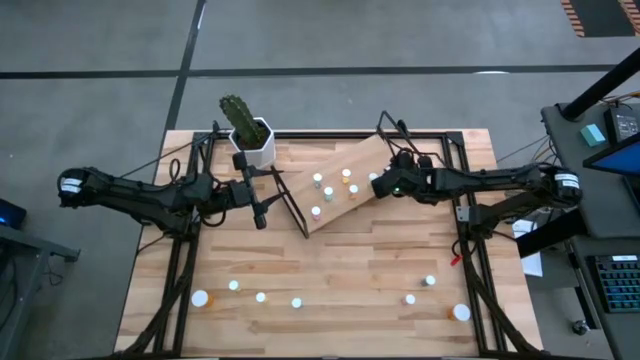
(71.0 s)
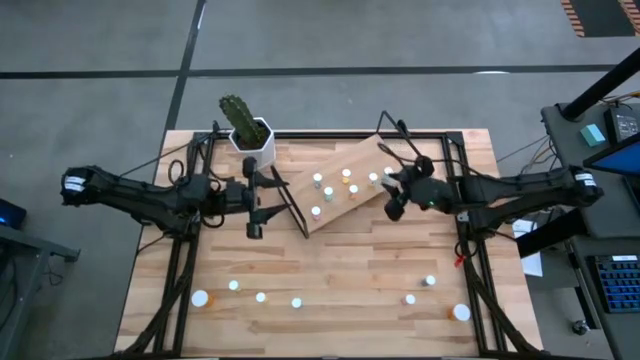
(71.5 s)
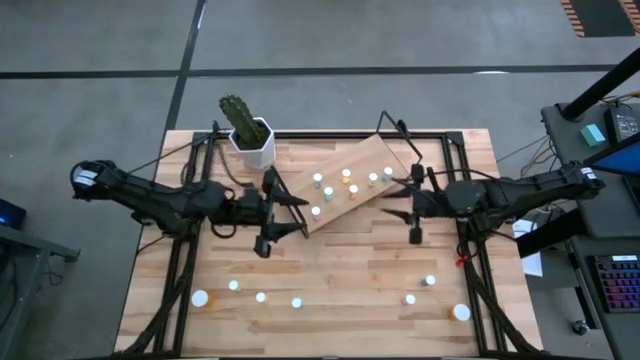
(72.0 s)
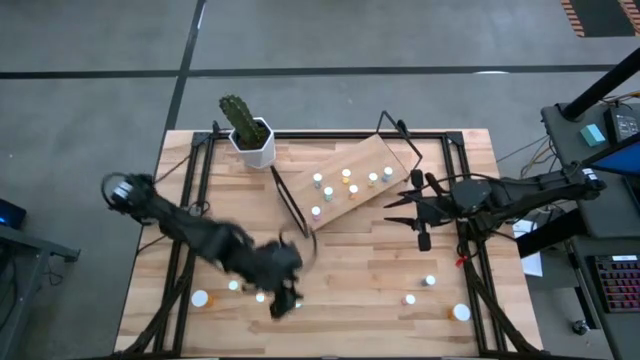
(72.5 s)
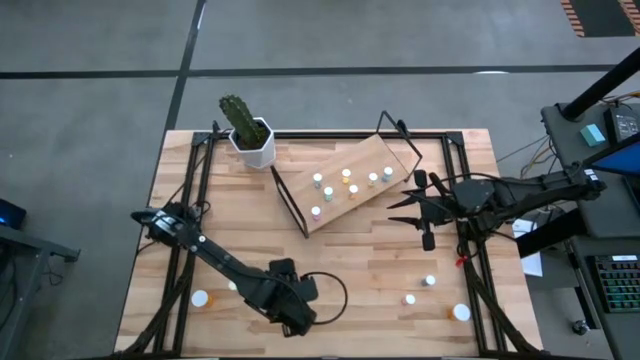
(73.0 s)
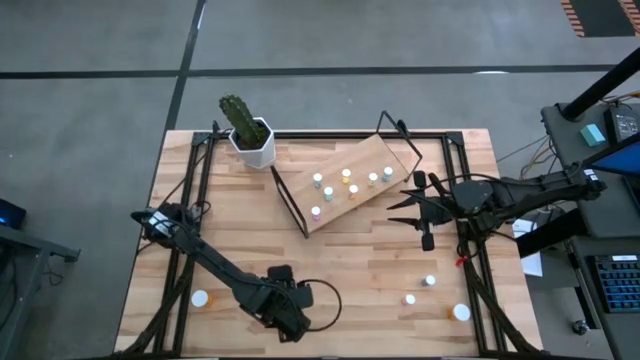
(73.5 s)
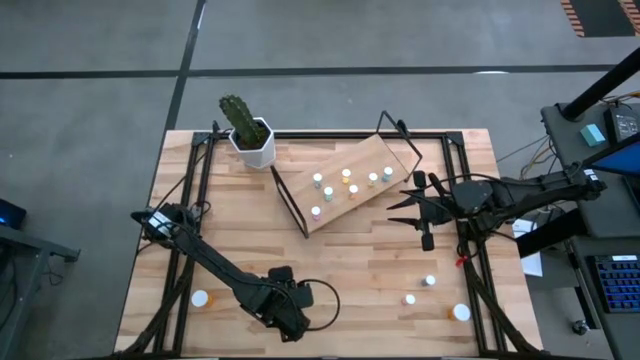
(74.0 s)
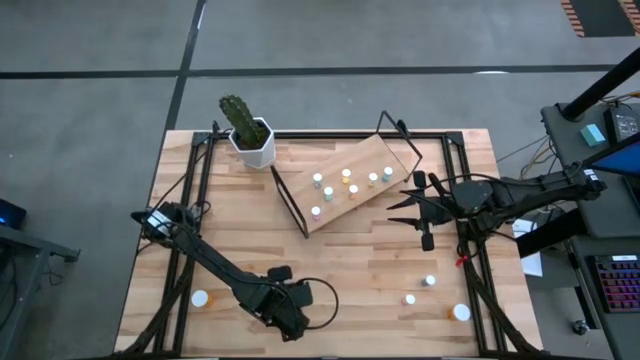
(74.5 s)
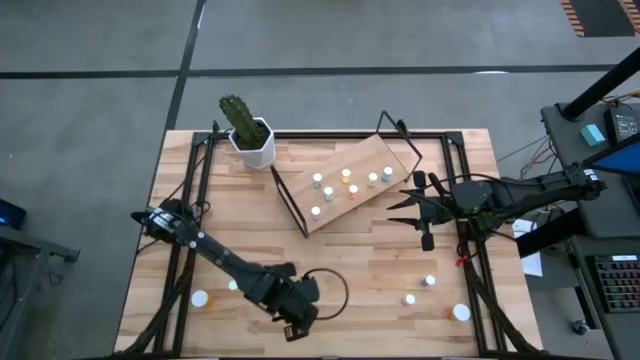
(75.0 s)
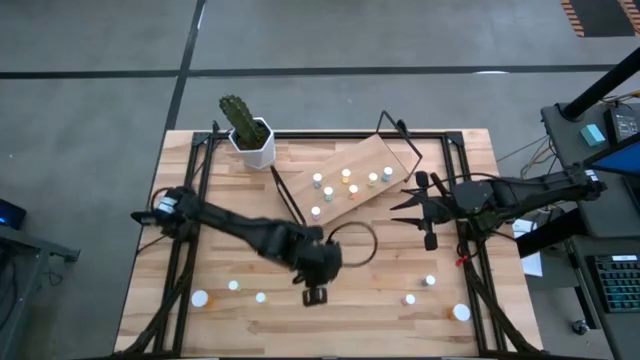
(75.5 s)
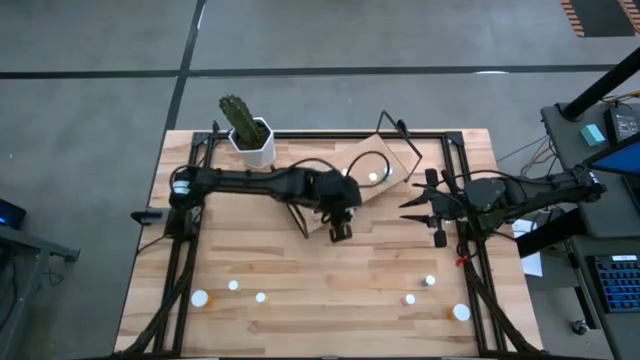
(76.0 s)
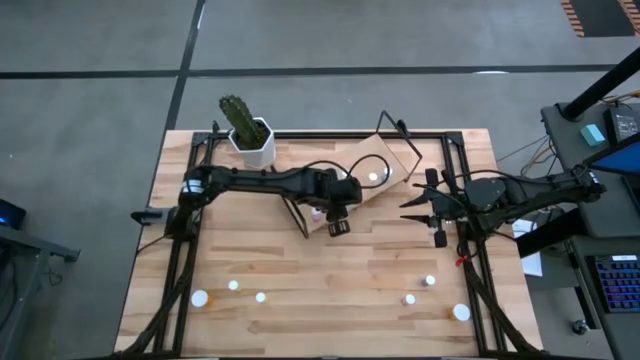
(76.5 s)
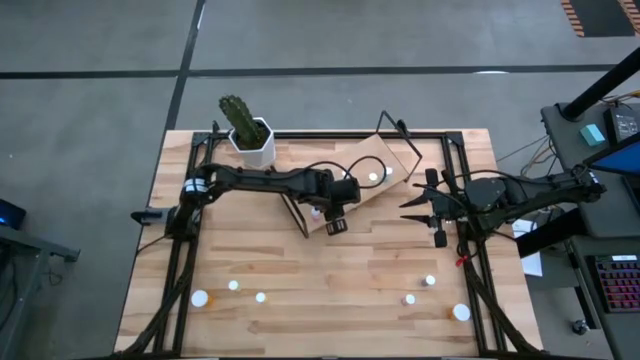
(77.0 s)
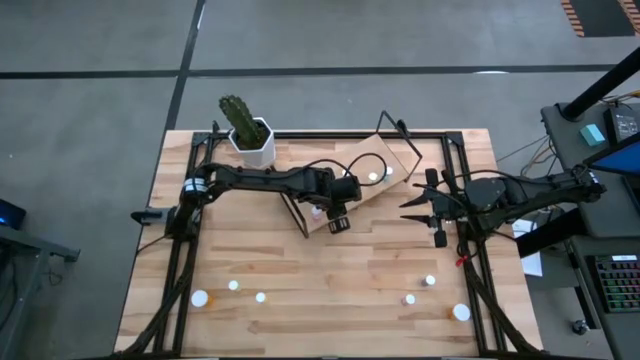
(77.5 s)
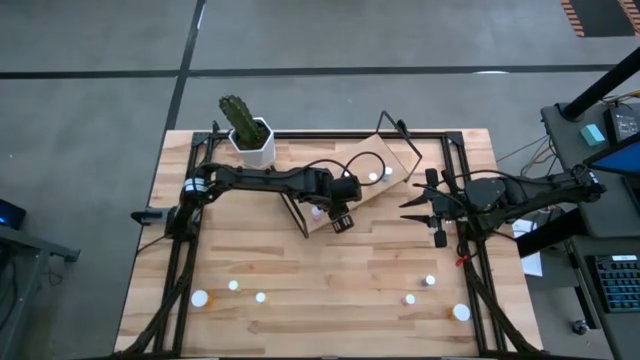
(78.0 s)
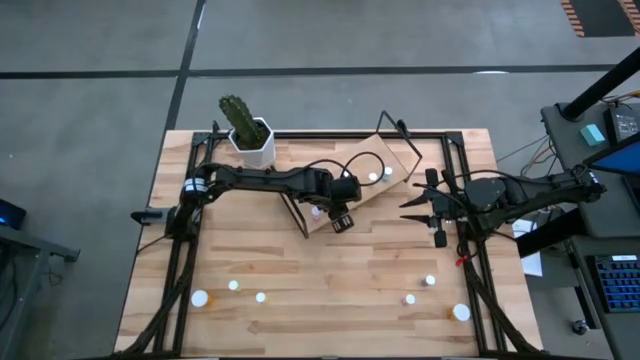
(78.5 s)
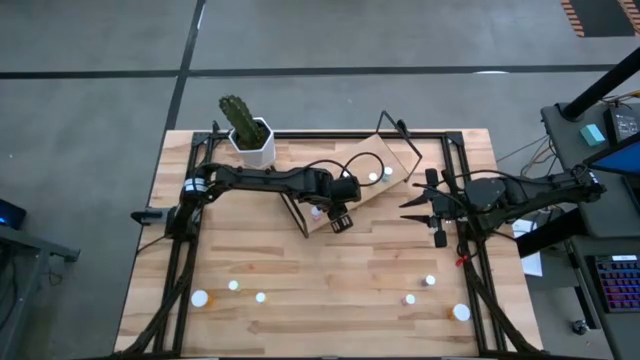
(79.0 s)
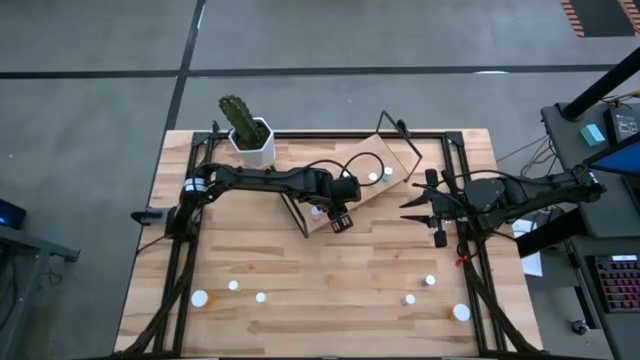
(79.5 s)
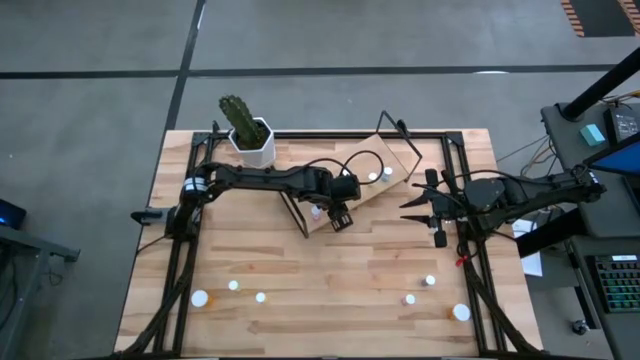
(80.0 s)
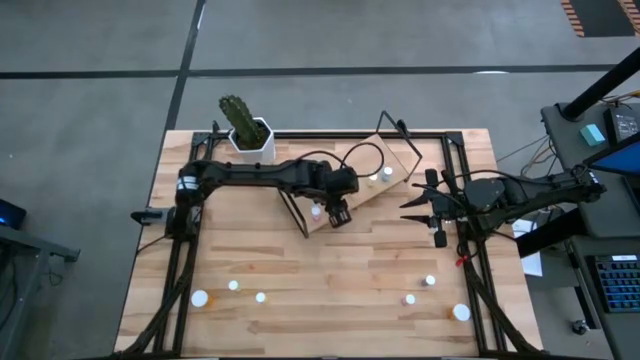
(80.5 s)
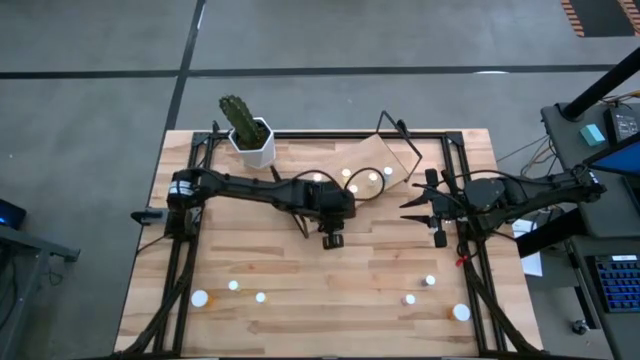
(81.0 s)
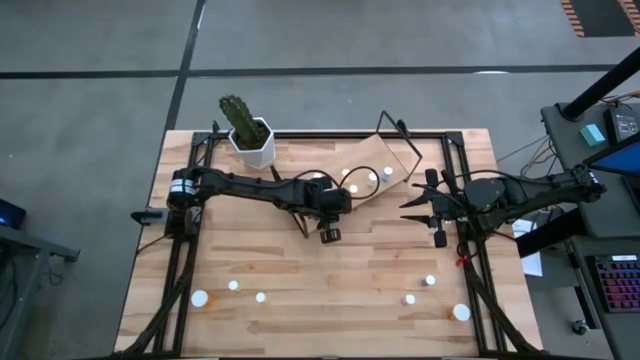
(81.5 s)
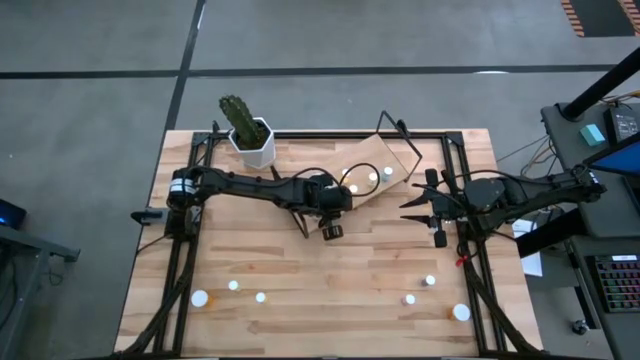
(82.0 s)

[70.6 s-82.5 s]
Task: Pick and place medicine bottles onto shelf by color
Put the green pill bottle on the shelf aligned with the other green pill bottles

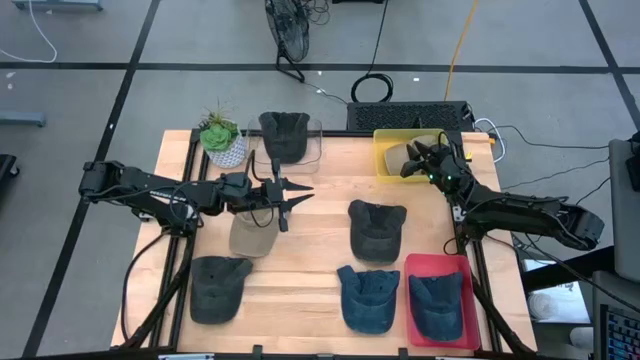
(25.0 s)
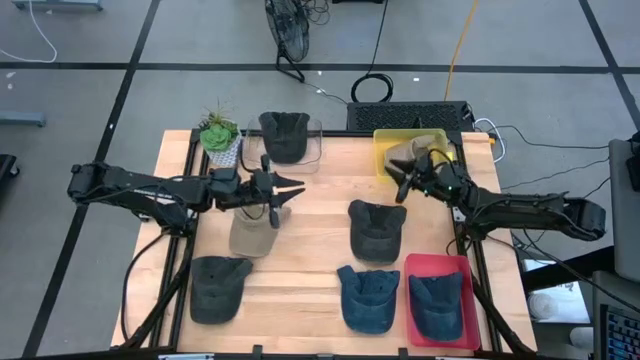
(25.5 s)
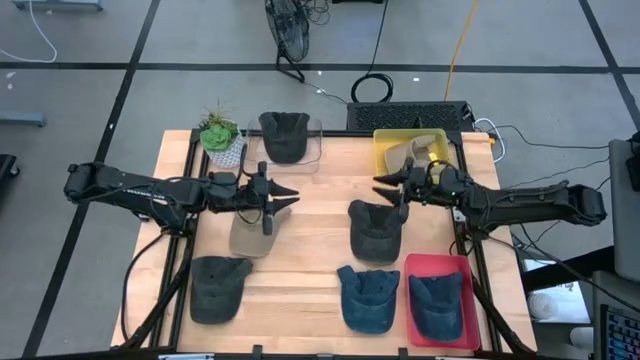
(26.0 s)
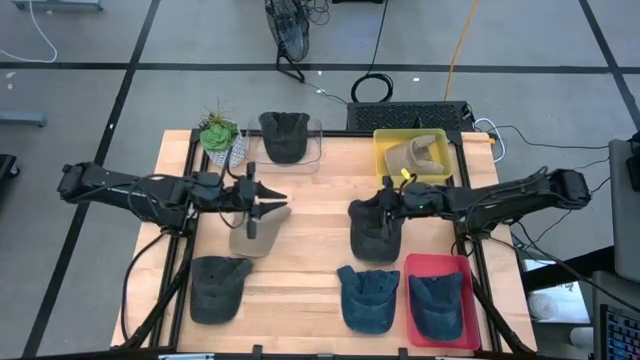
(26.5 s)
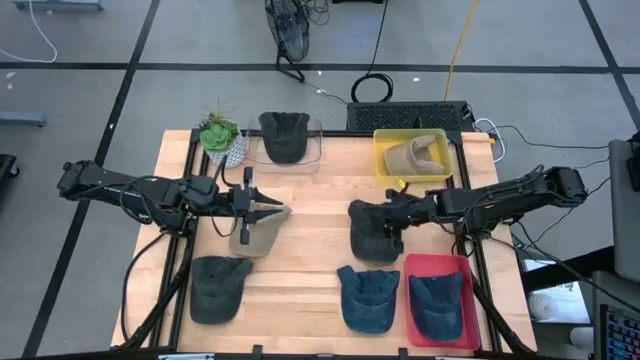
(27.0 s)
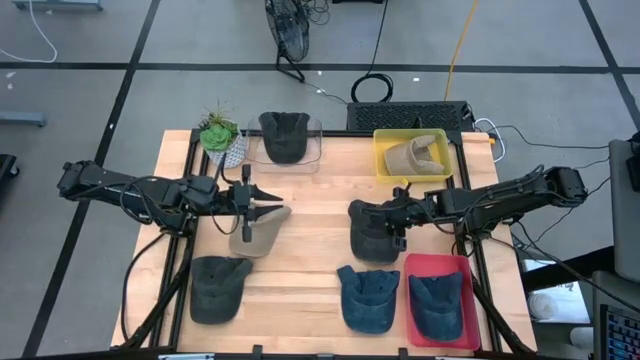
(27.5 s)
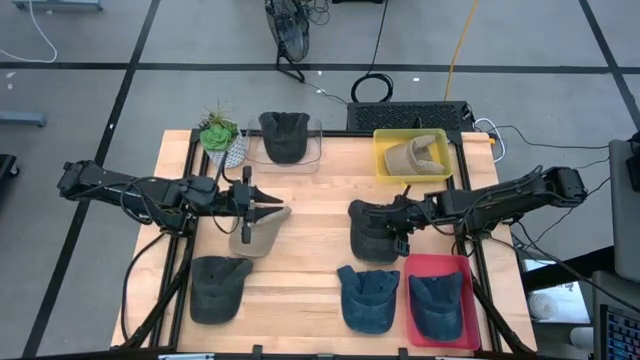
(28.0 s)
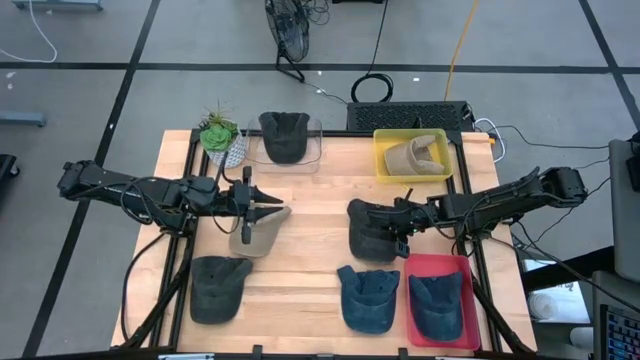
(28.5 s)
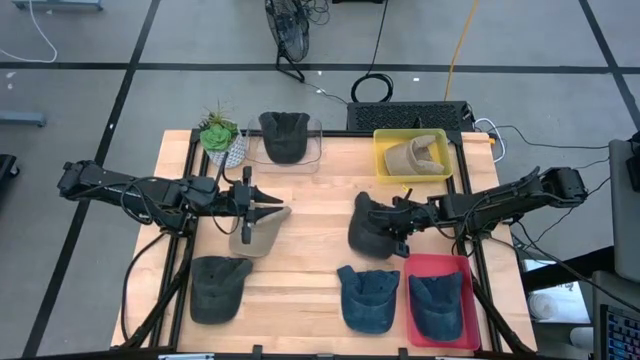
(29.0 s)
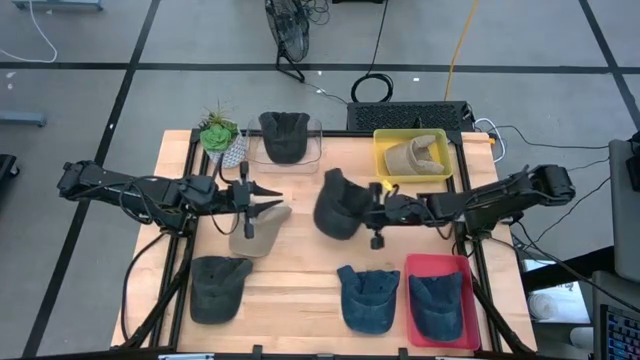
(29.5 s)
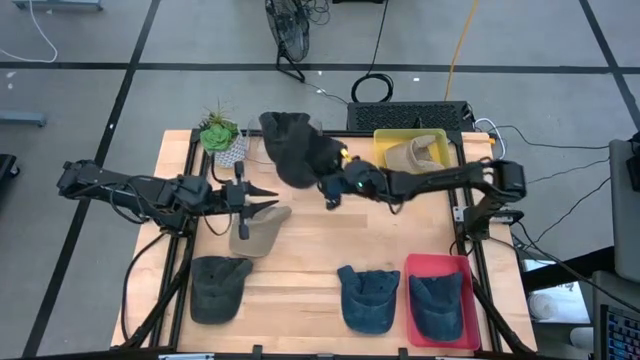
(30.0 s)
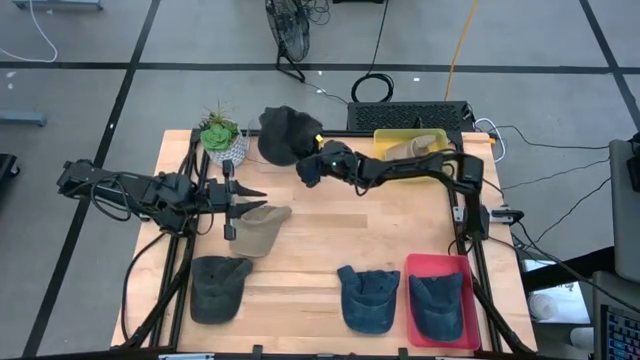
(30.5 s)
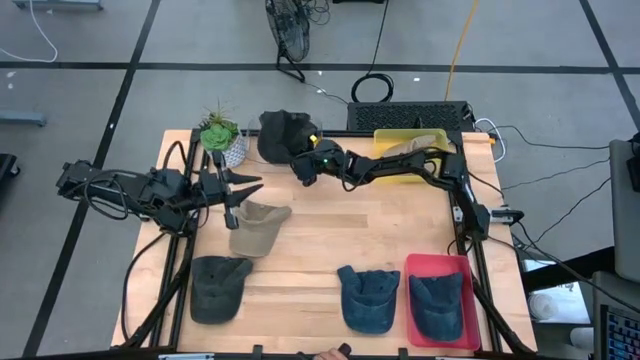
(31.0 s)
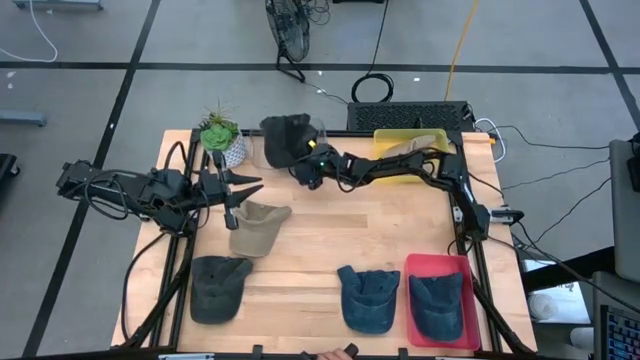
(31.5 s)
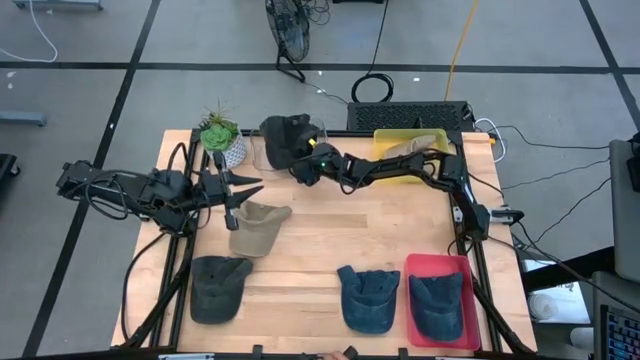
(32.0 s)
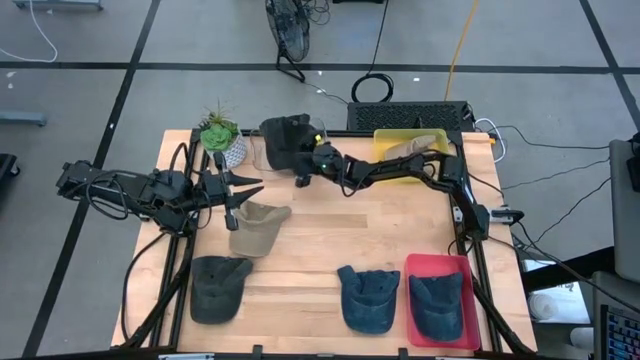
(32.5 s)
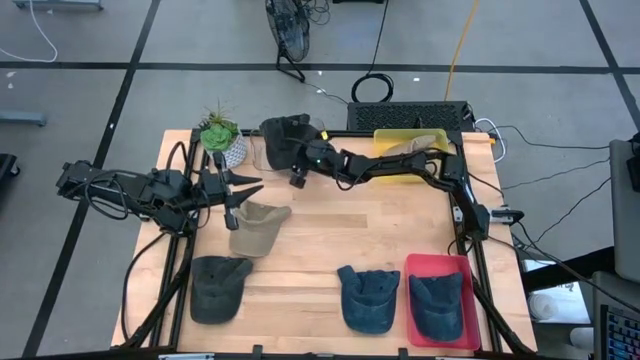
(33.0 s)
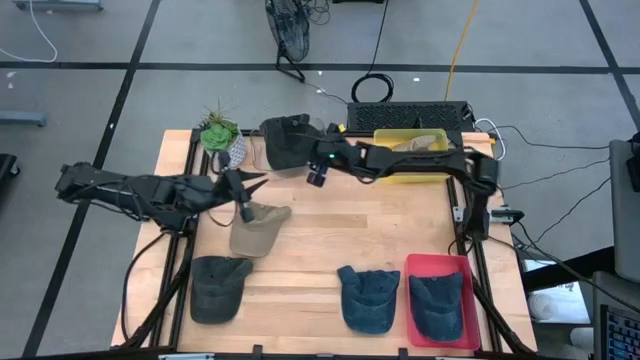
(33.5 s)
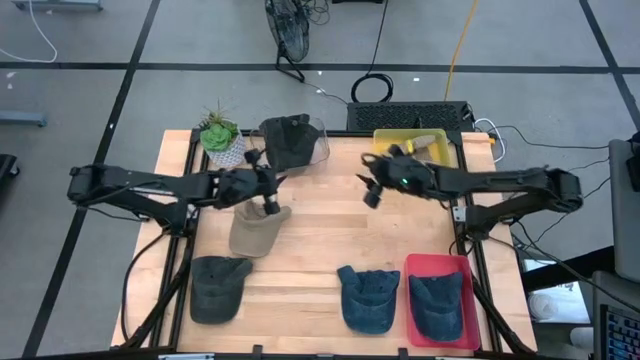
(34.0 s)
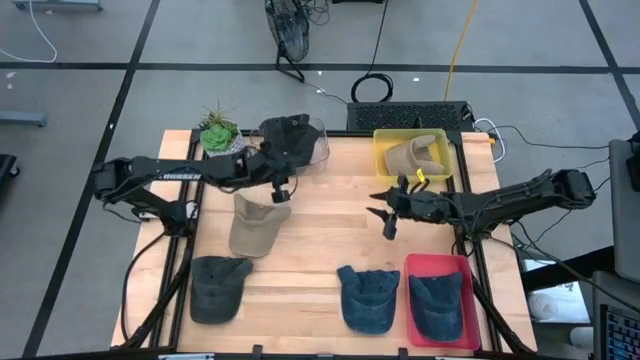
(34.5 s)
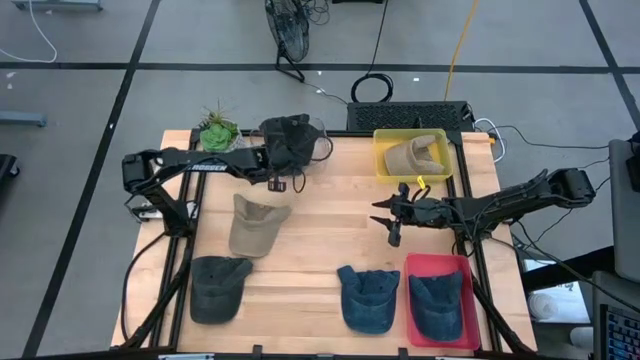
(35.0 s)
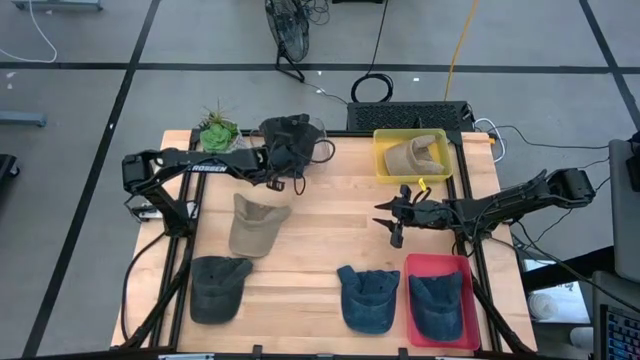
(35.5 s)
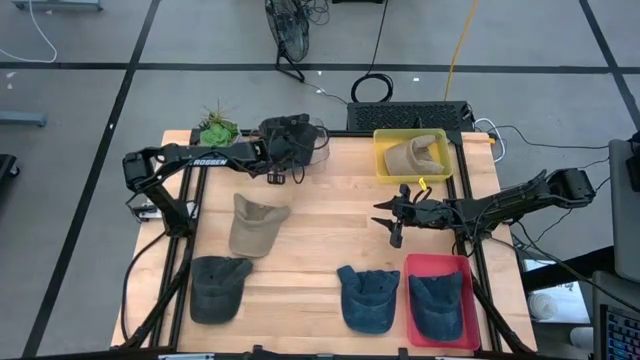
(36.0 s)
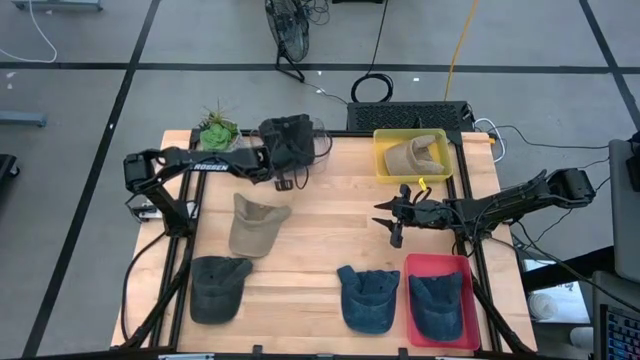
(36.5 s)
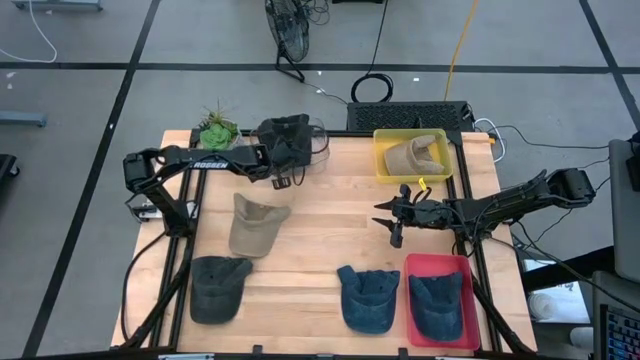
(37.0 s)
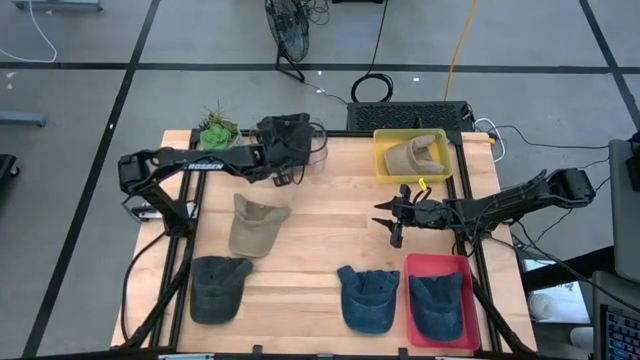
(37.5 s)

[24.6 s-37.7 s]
Task: Pick & Place hat
Put the right black cap into the transparent bin
